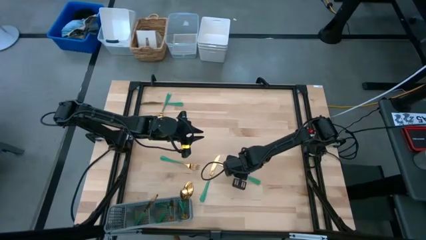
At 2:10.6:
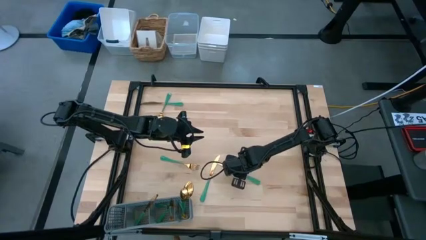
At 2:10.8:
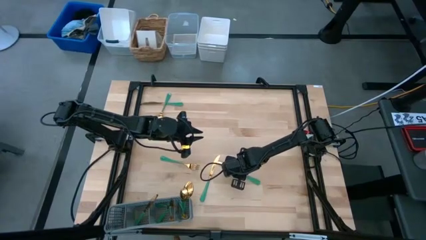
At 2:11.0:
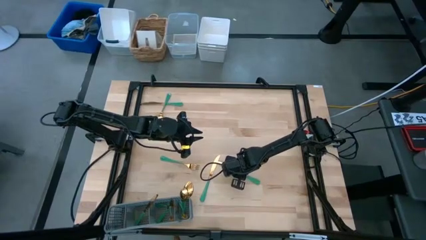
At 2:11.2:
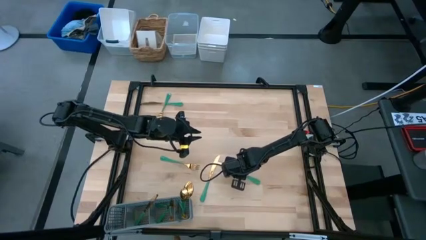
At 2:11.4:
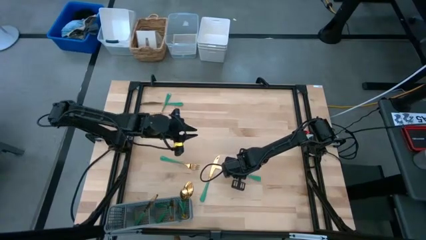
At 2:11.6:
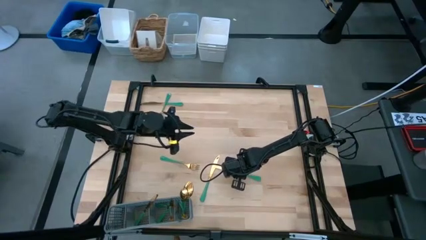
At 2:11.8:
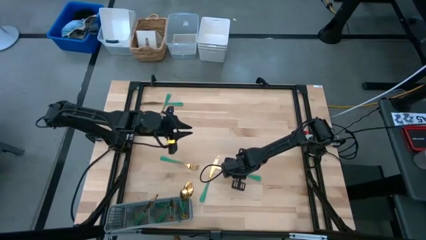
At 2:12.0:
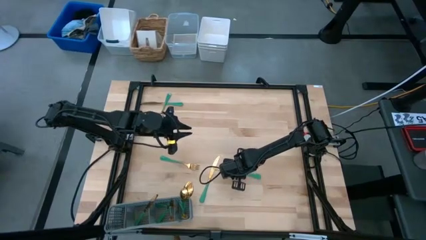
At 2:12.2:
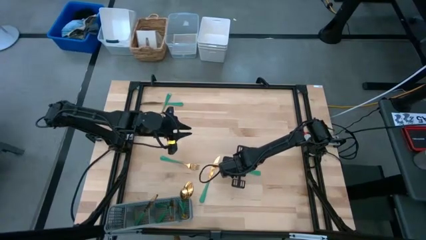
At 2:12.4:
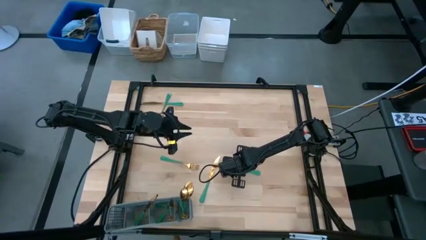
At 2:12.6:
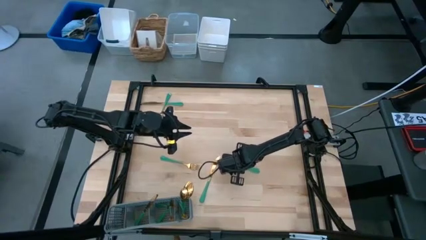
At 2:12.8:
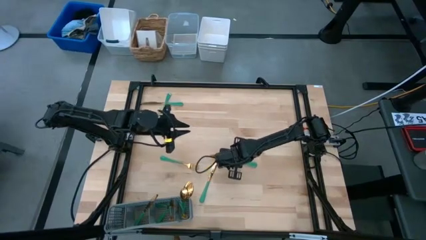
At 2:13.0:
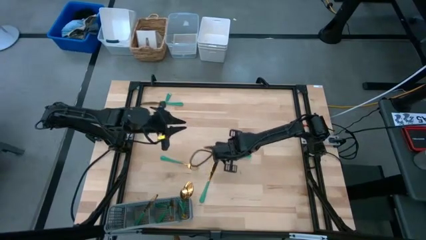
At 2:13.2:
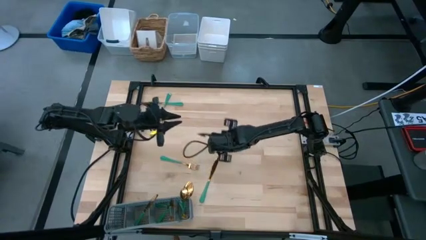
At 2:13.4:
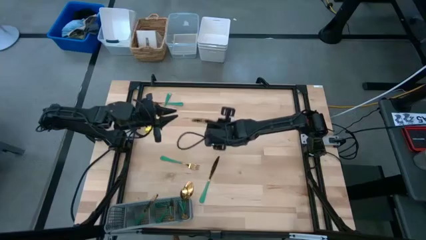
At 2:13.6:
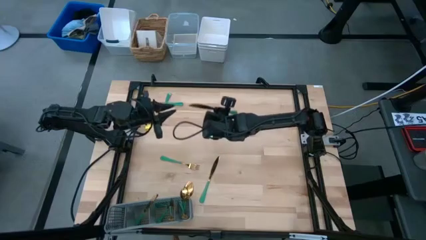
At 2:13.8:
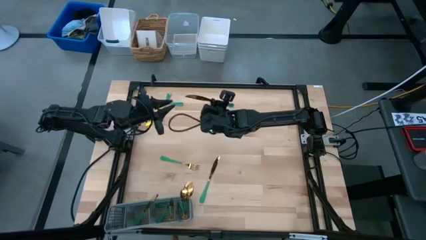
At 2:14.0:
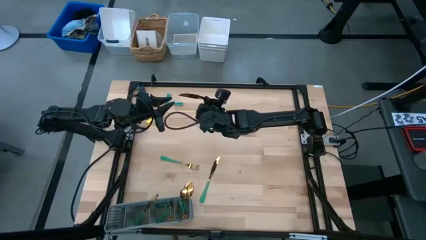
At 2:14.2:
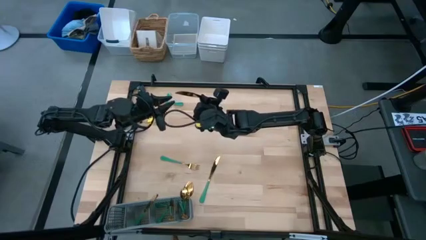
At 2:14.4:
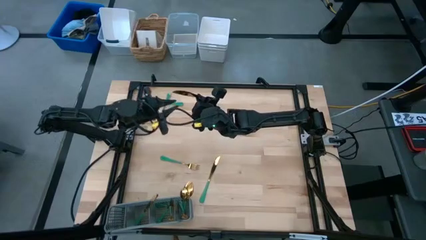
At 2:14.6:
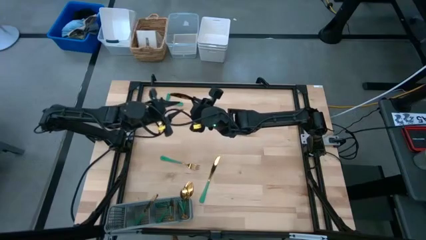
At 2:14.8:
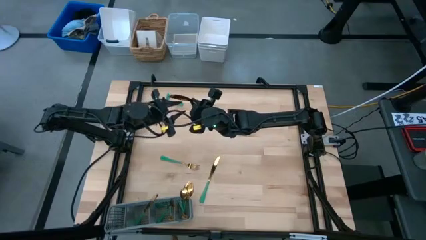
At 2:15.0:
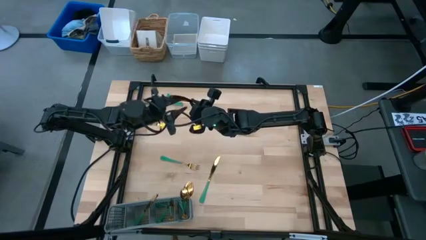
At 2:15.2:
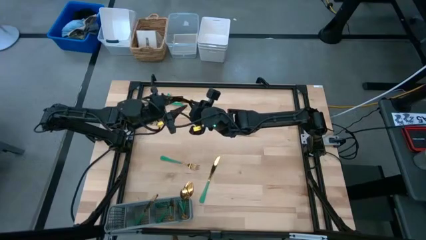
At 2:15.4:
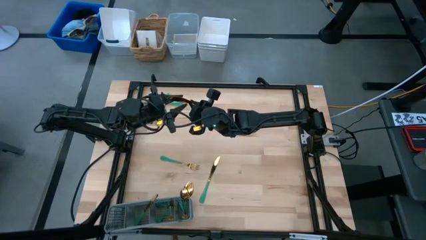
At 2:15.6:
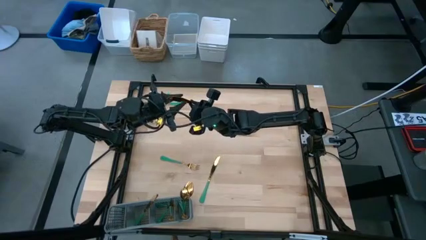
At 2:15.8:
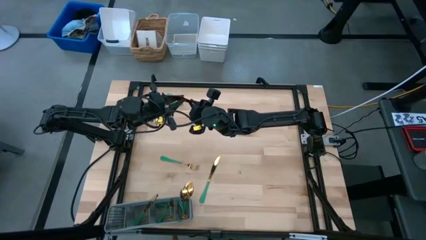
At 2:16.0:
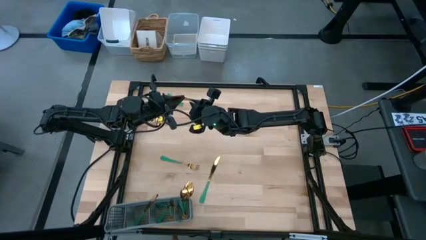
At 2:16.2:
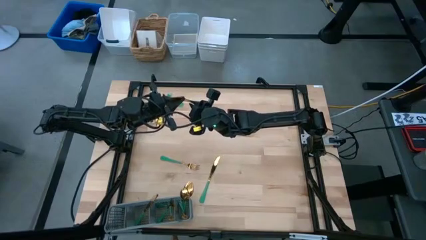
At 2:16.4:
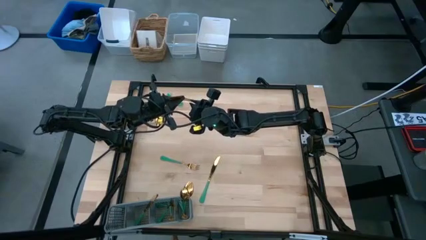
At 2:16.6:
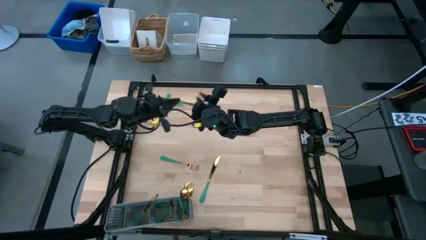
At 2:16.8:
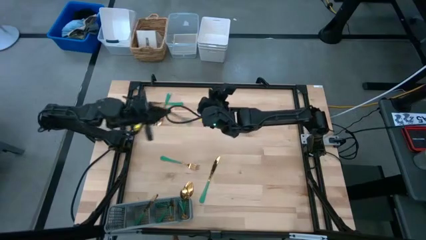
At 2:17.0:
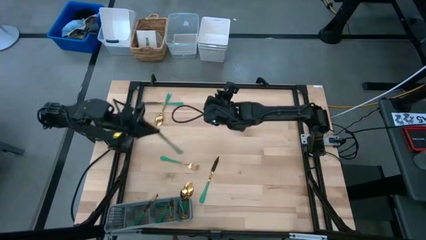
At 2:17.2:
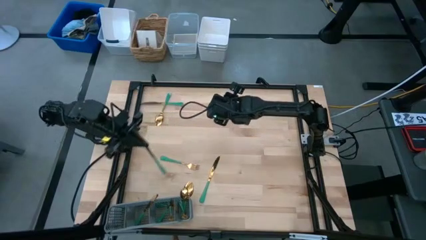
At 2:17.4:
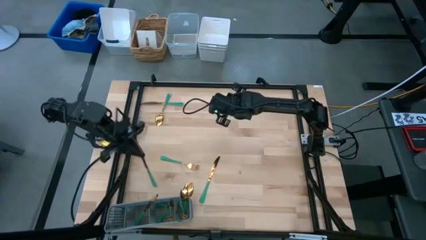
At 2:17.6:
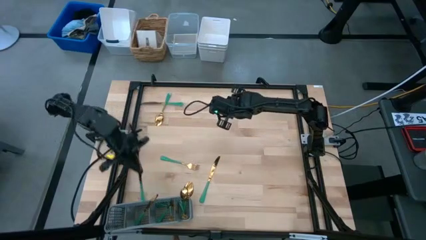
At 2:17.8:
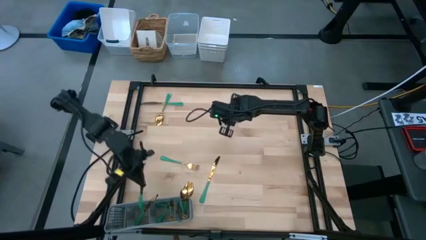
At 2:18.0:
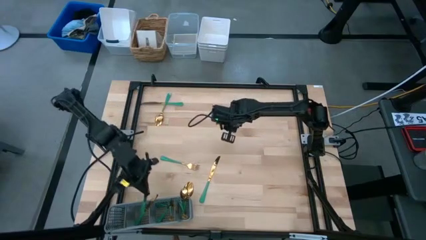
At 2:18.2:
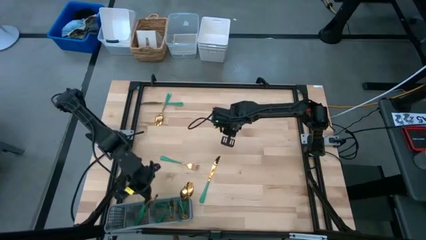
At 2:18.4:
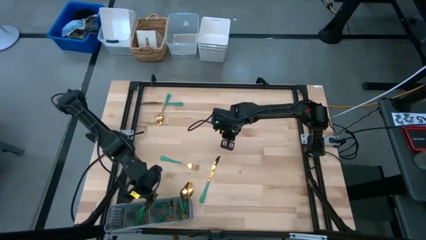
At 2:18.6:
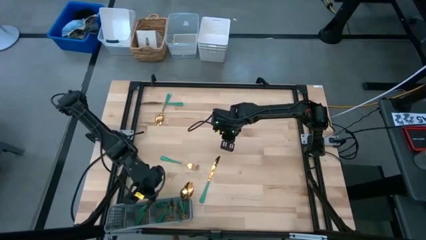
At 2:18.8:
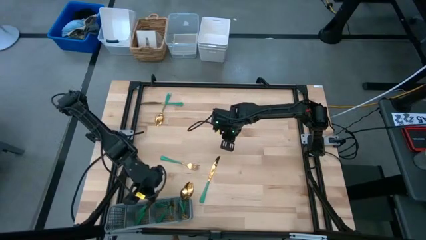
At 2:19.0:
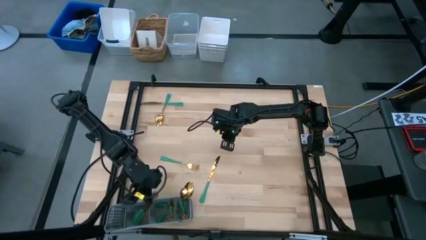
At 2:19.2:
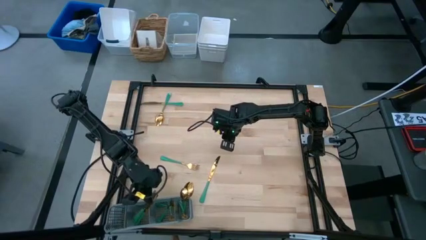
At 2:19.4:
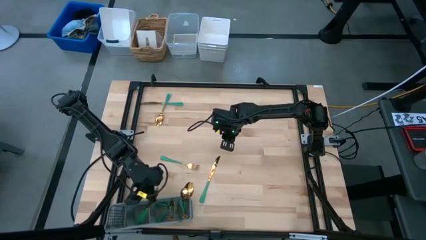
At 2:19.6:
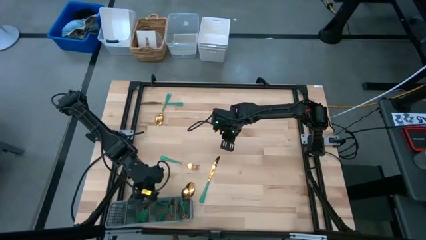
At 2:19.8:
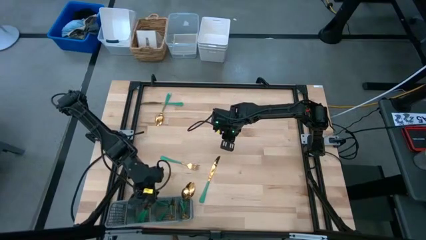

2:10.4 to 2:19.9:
Task: Sort silverware
Put the right knife into the cutlery rack

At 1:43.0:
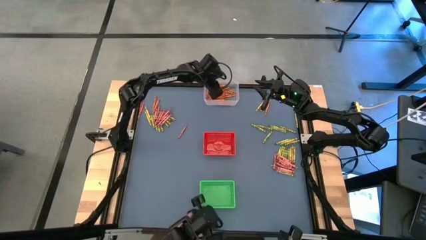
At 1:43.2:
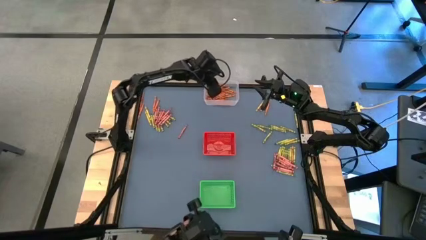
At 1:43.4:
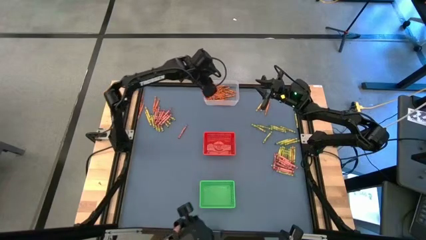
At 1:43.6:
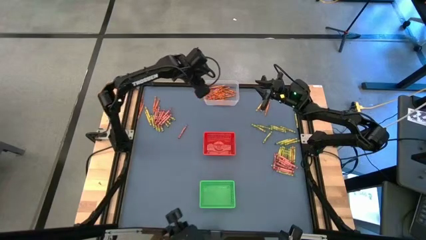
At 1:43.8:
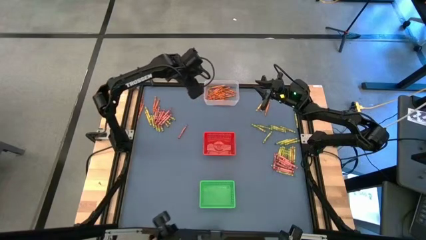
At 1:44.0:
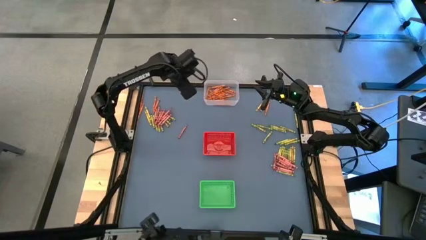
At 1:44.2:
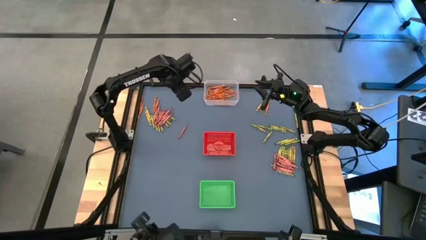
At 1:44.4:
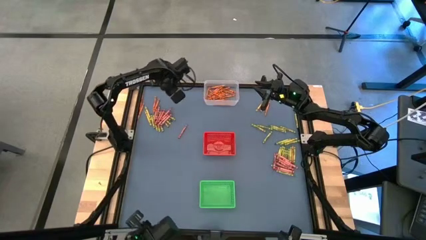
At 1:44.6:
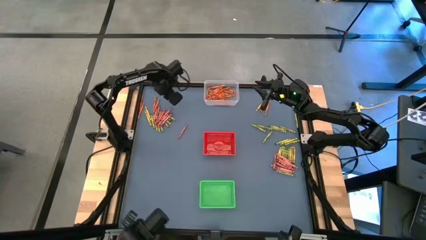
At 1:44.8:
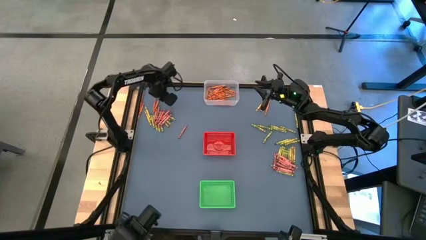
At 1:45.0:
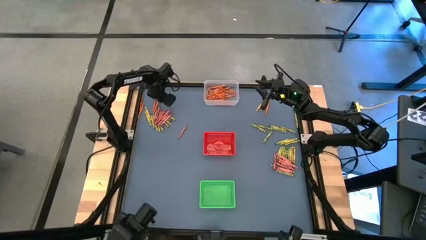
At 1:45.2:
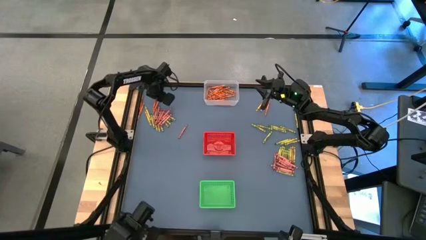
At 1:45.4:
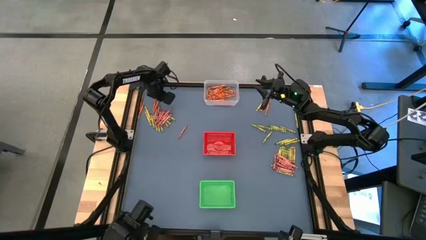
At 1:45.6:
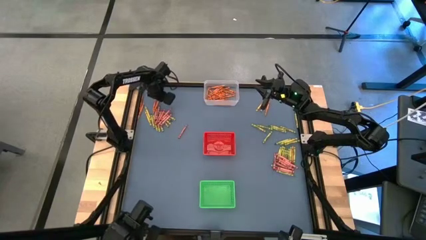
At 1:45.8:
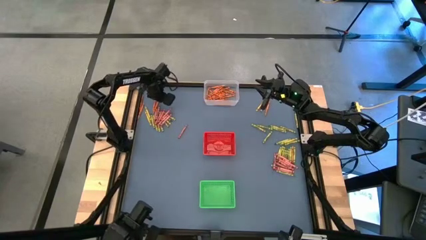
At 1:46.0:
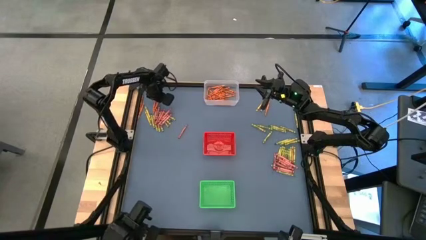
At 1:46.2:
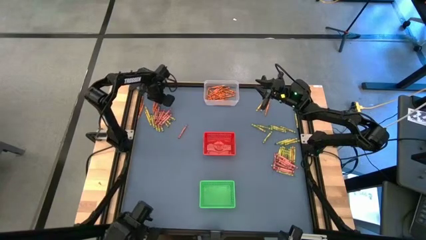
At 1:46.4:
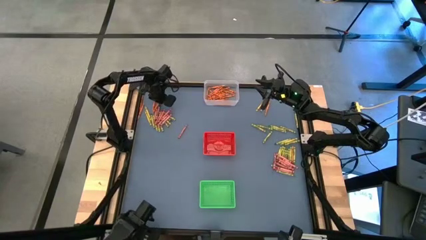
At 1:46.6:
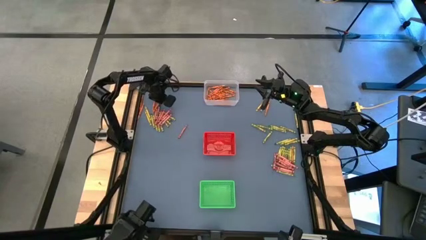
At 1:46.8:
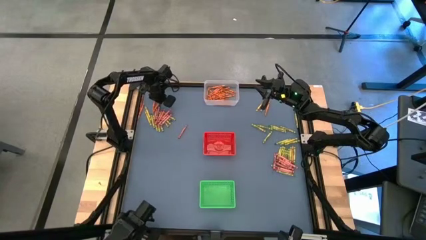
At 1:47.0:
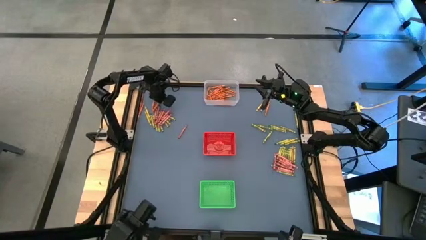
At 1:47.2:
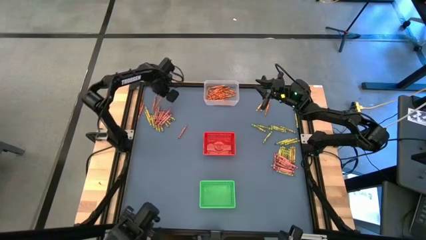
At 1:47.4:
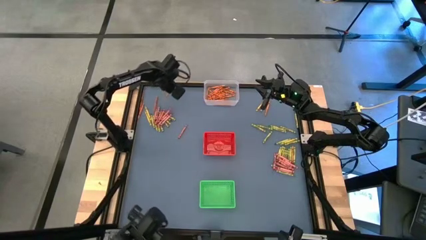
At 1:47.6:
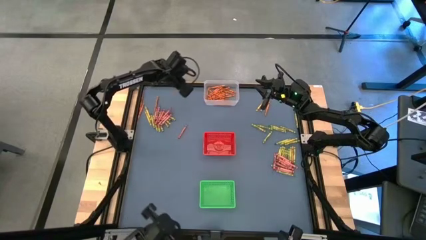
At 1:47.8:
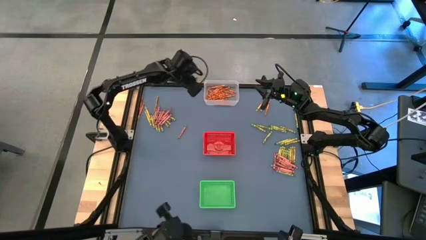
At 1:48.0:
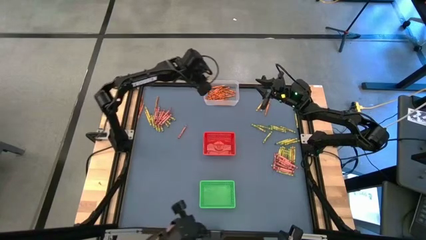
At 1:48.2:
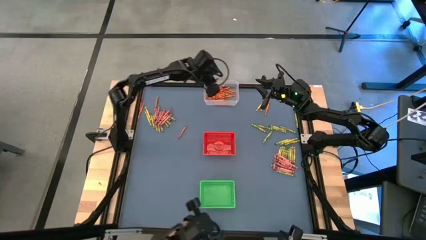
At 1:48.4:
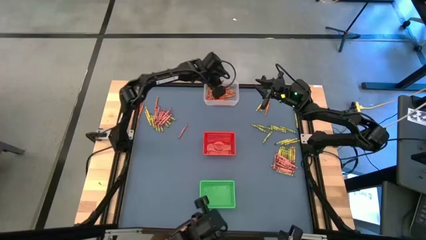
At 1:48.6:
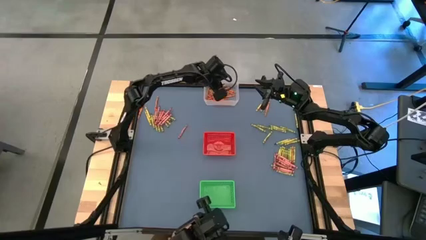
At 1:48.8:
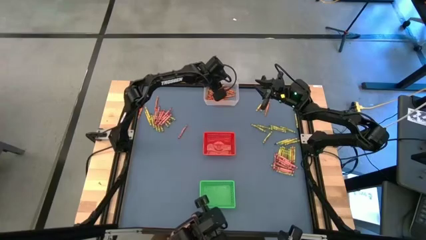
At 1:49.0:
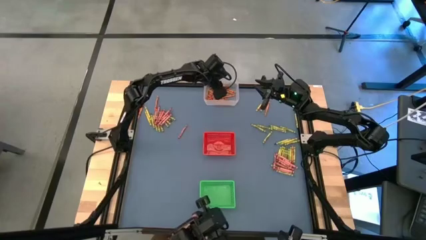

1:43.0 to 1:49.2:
Task: Sort crayons
Put the orange crayon into the transparent bin
